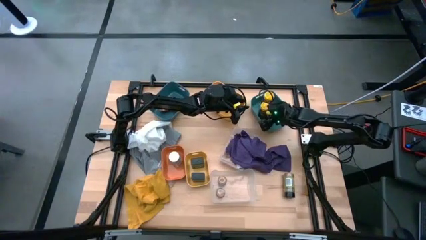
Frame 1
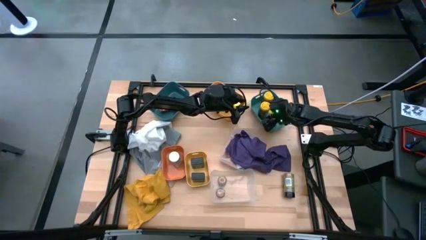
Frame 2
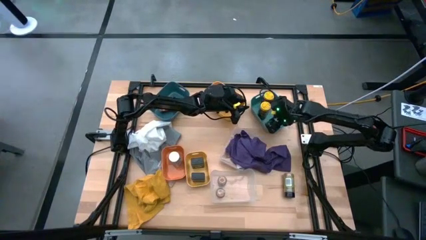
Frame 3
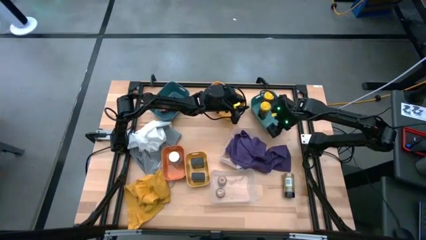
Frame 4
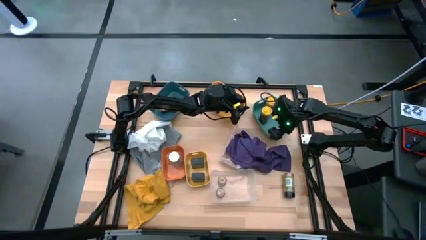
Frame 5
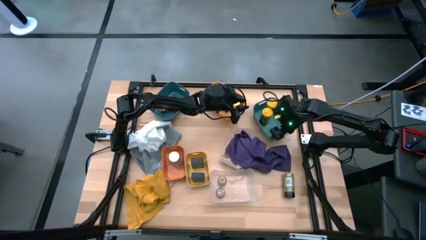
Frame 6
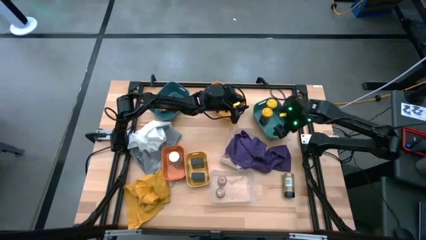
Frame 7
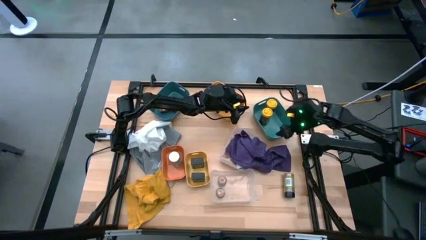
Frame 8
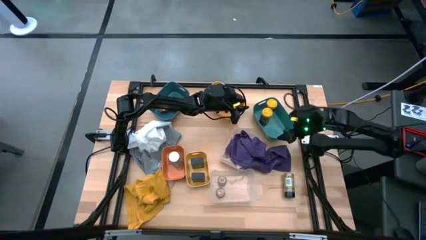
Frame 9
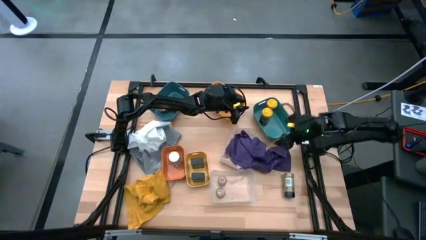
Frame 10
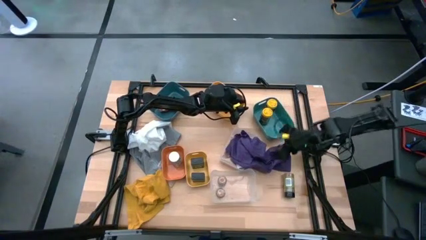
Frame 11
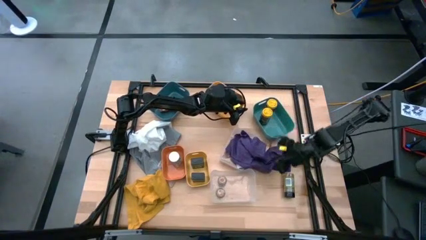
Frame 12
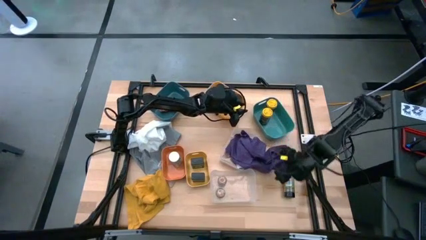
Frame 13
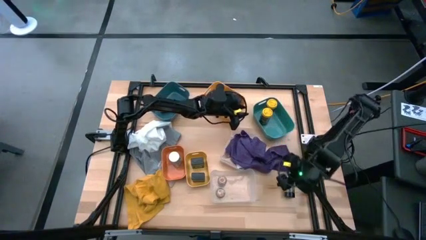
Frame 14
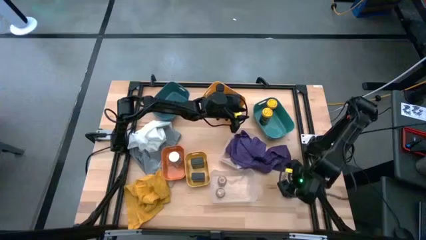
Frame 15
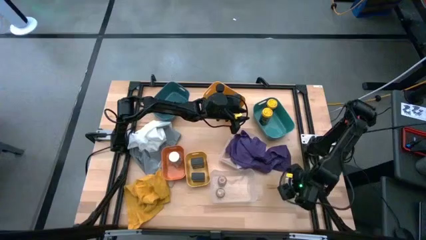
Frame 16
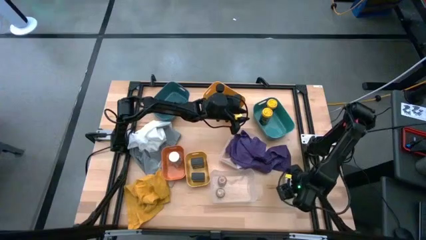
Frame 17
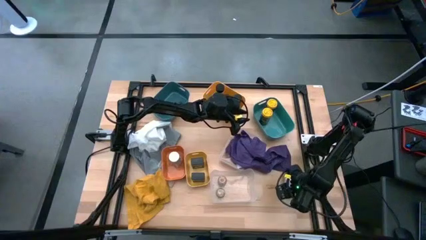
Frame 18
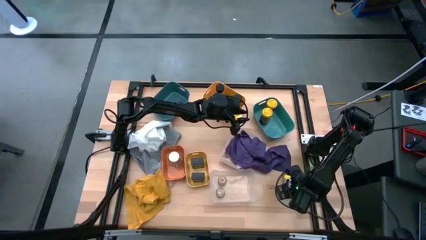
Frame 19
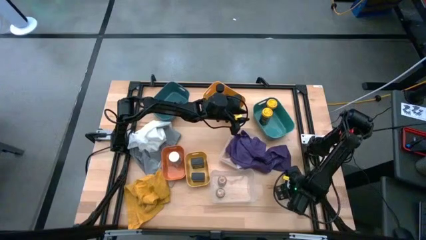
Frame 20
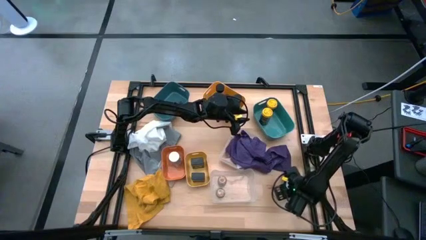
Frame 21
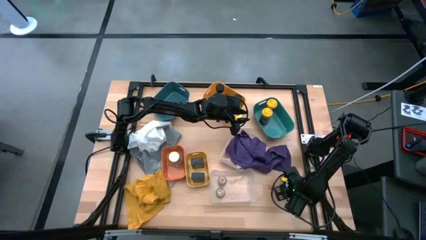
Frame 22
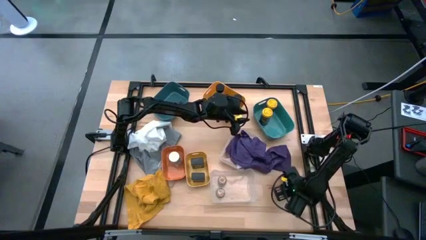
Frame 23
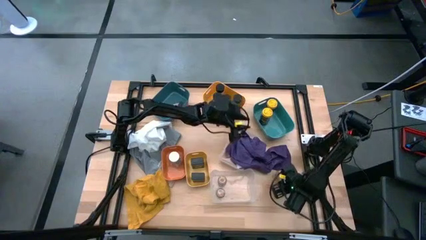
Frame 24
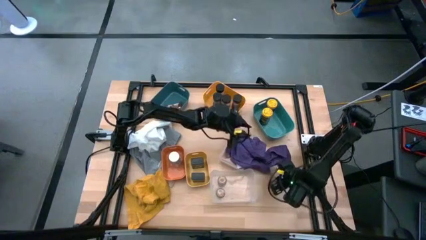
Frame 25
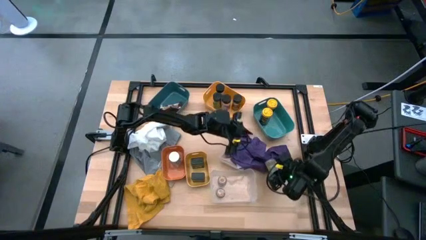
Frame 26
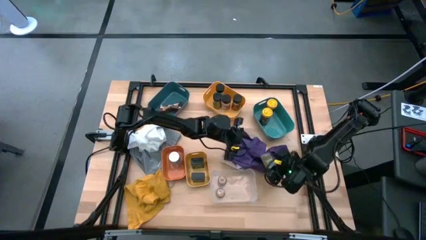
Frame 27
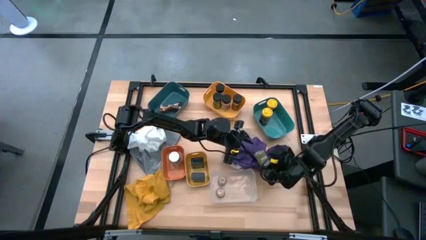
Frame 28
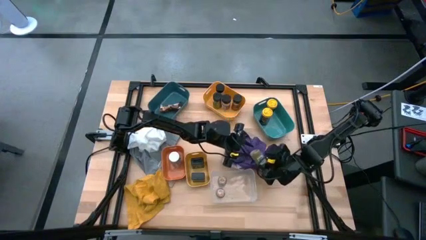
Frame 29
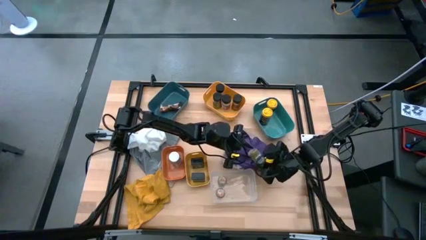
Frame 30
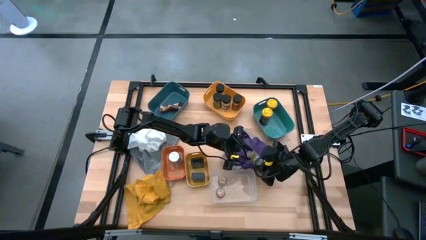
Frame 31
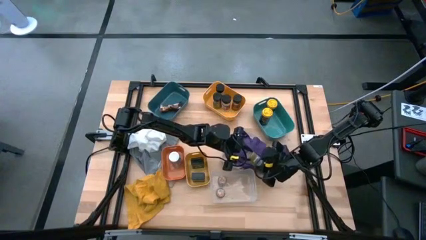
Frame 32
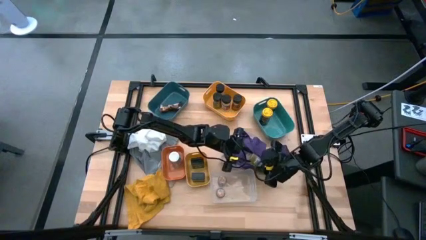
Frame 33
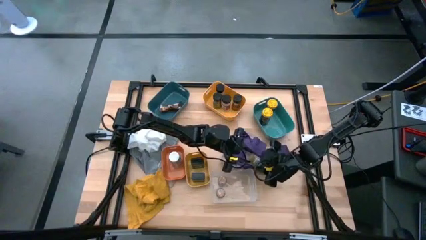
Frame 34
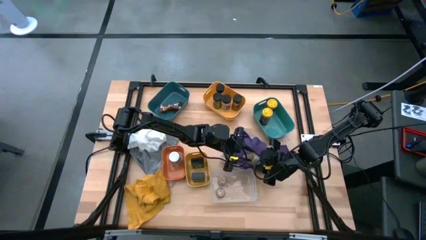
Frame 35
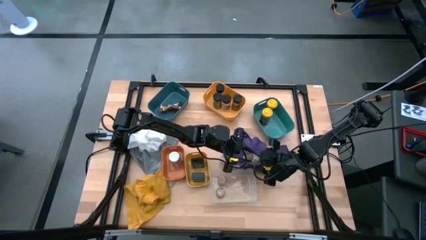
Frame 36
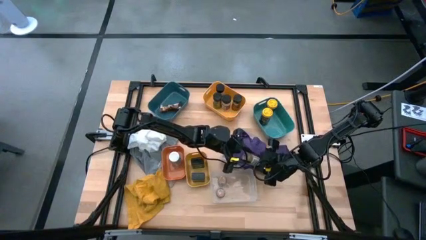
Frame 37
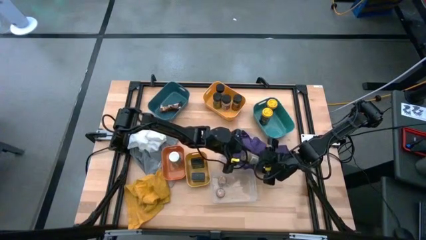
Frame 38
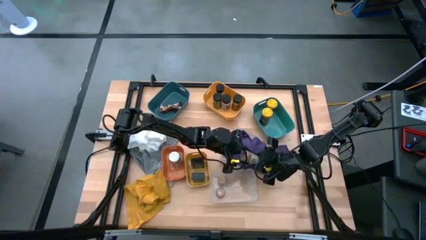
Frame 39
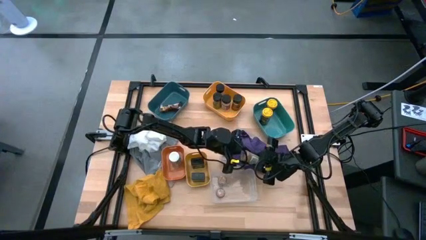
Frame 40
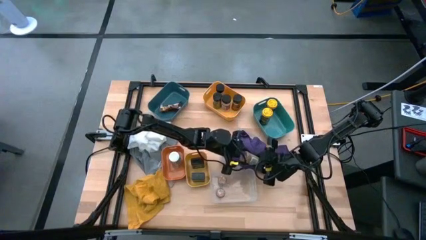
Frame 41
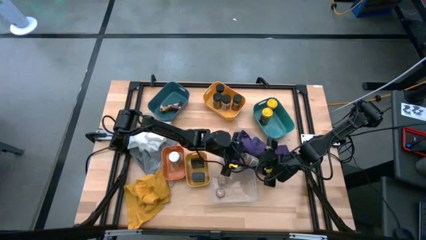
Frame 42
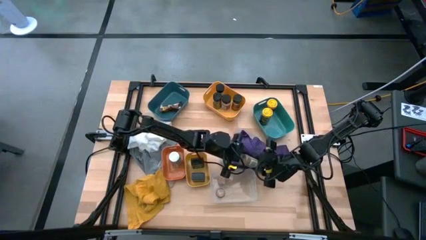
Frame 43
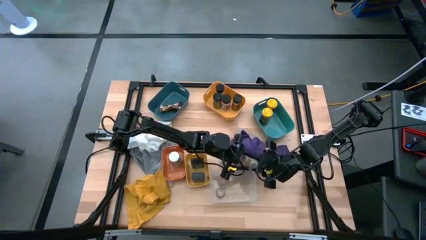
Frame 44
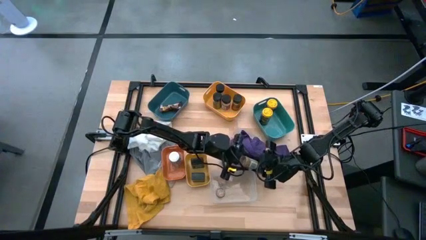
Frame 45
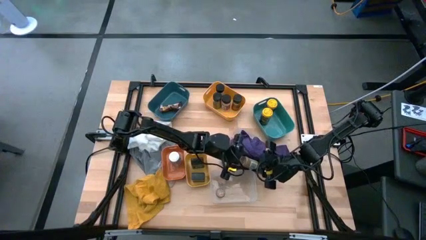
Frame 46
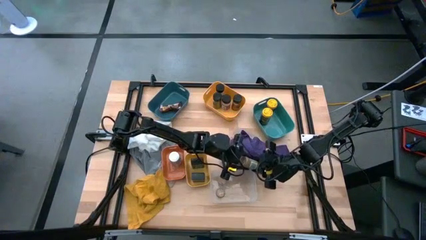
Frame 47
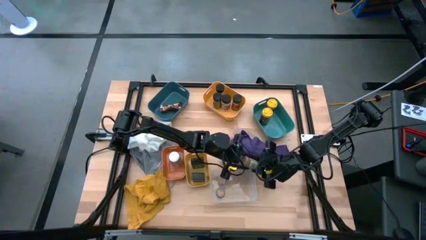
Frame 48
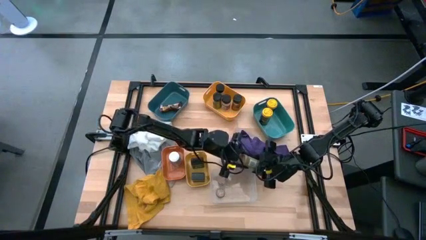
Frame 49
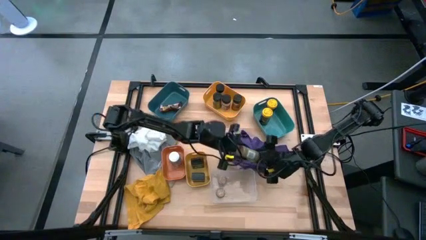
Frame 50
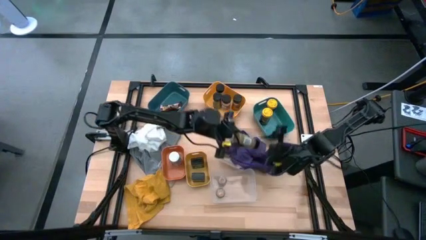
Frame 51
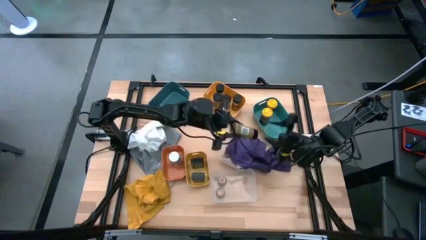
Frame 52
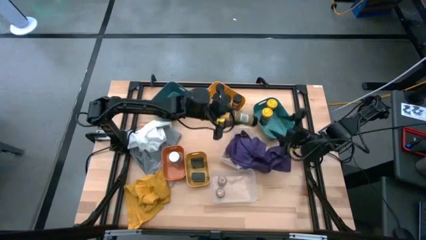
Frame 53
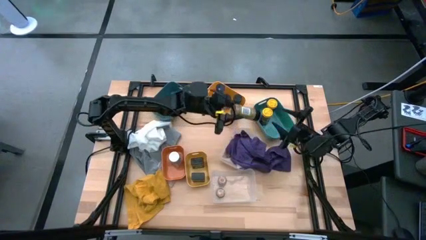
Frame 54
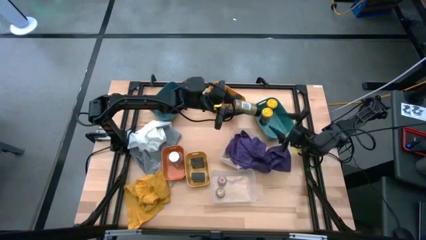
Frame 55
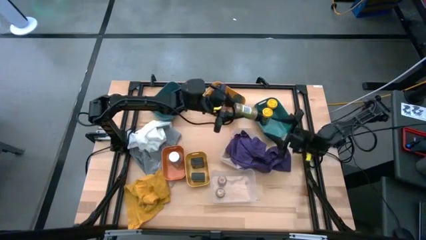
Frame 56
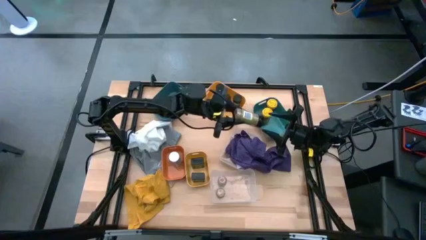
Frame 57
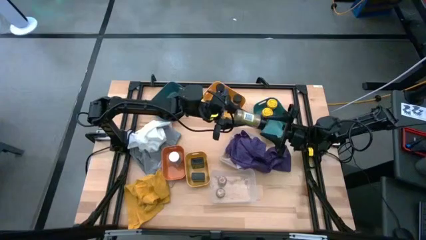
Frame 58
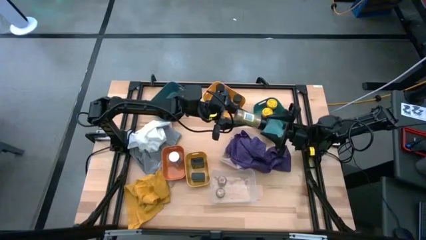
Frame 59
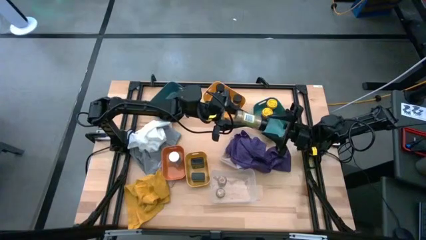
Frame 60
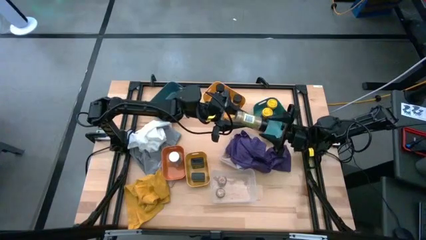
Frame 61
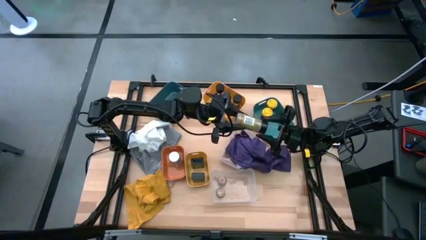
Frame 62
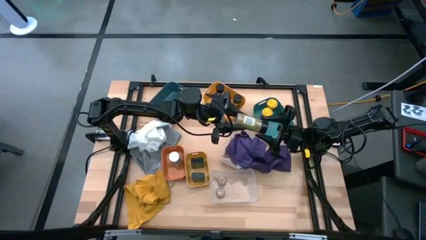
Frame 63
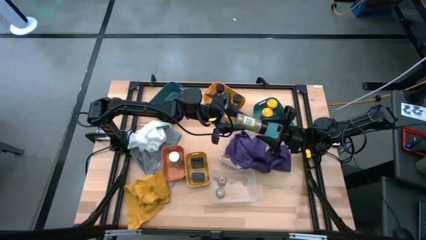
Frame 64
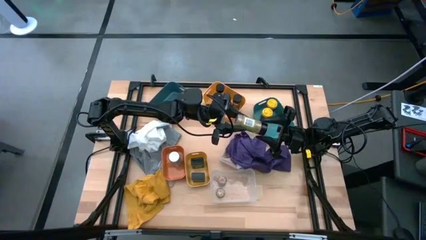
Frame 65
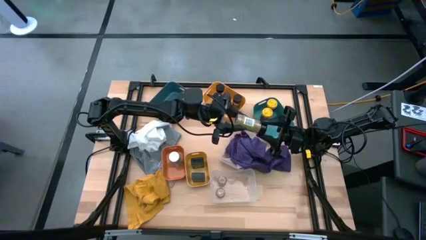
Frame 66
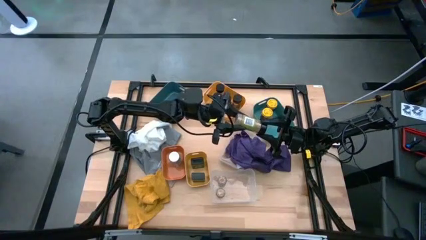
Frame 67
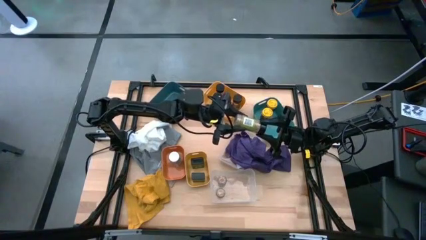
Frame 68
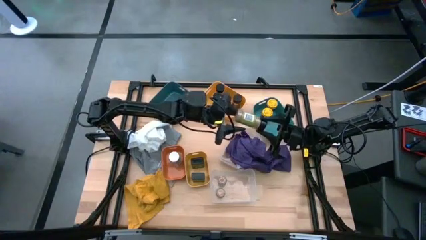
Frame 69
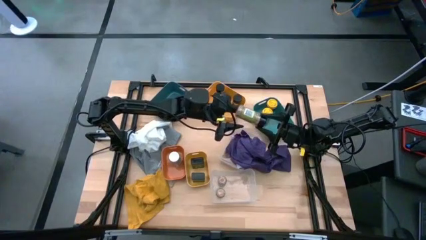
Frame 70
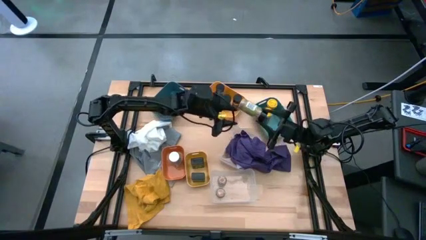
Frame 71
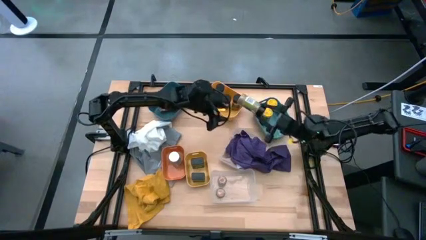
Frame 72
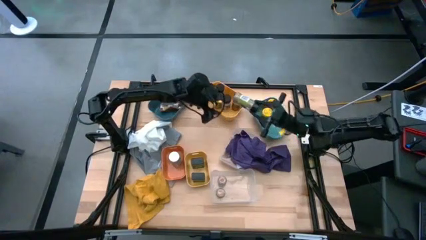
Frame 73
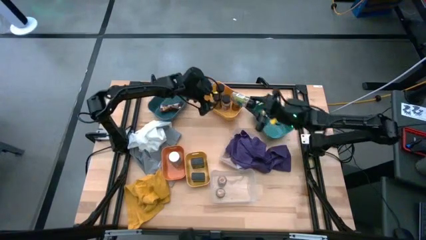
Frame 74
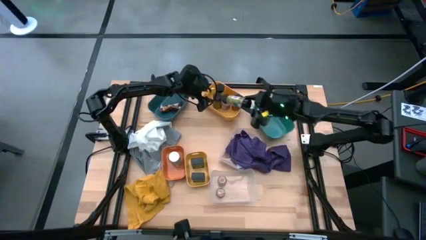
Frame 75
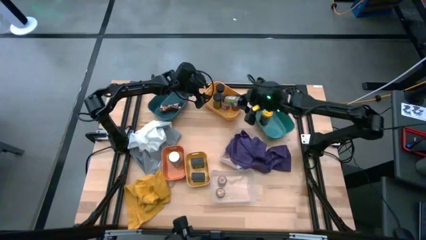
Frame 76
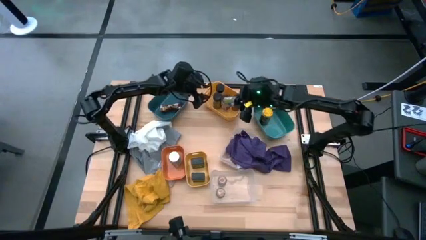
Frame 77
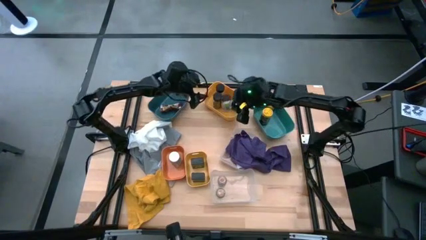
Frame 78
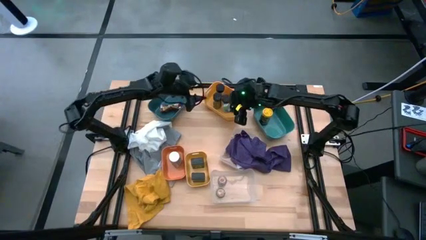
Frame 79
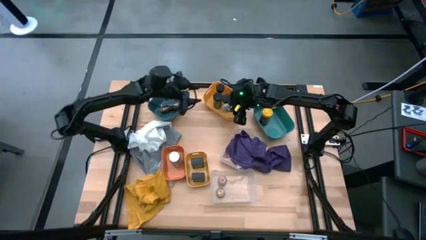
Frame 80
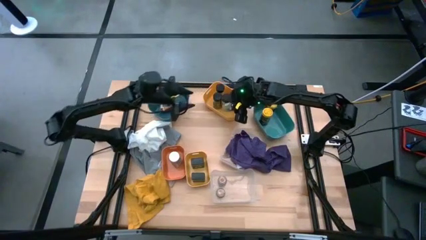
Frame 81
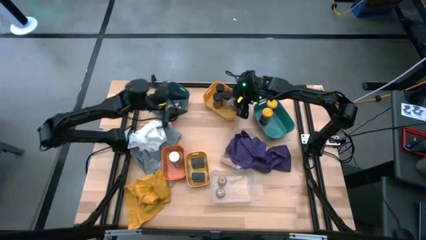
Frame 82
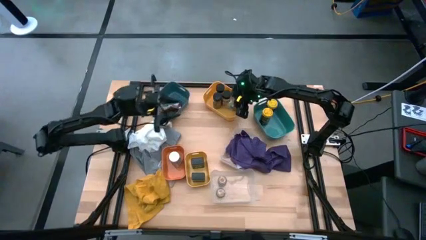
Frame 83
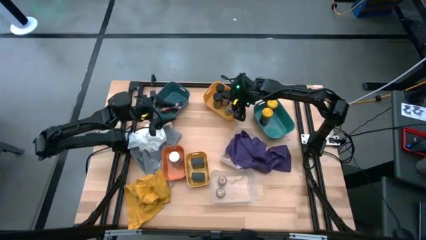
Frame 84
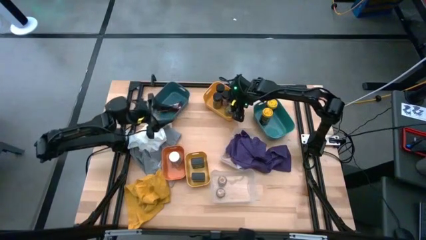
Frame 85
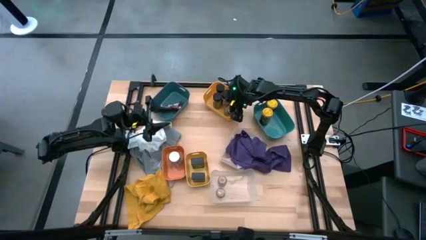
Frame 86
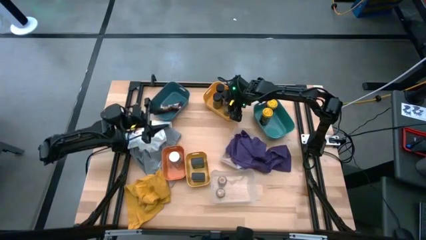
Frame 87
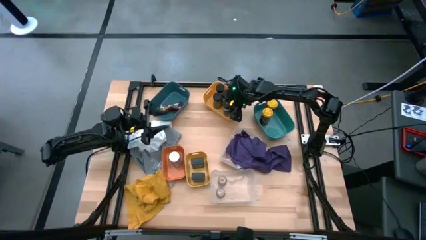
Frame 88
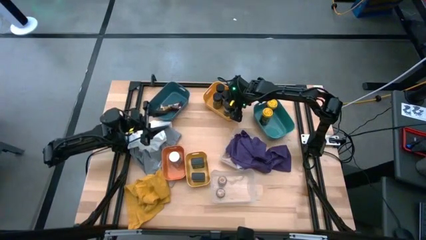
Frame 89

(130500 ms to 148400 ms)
Task: Sort spices by type
Put the green spice bottle into the yellow bin
